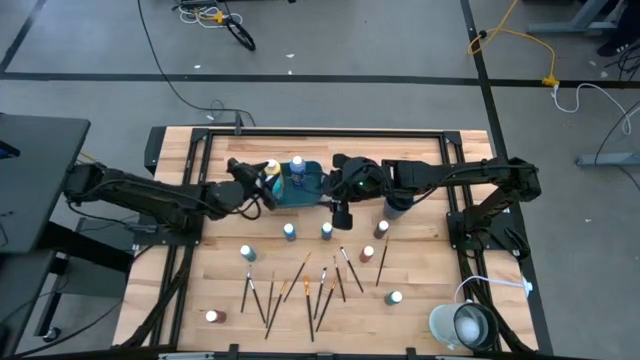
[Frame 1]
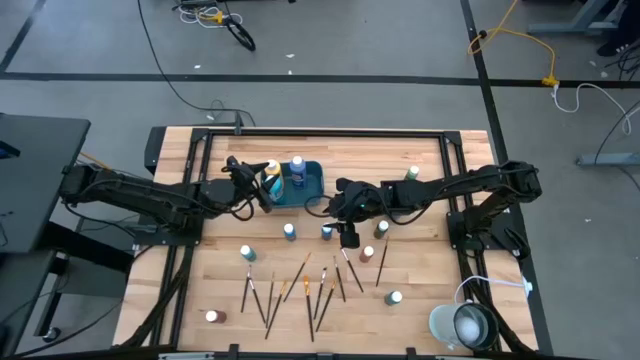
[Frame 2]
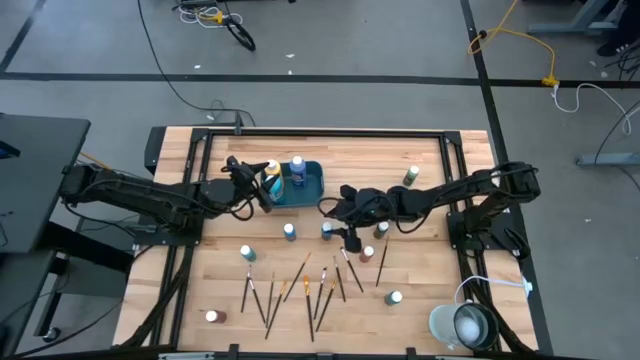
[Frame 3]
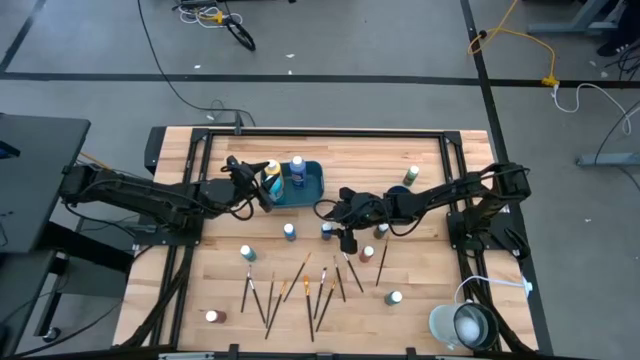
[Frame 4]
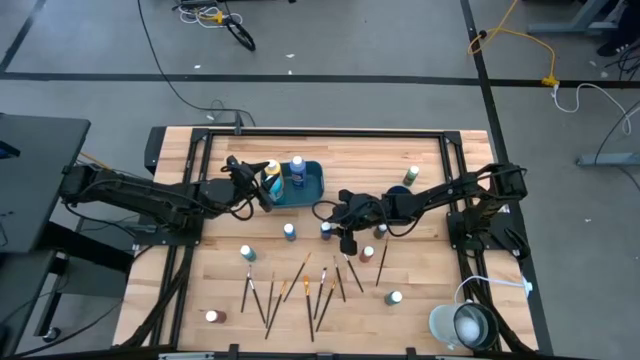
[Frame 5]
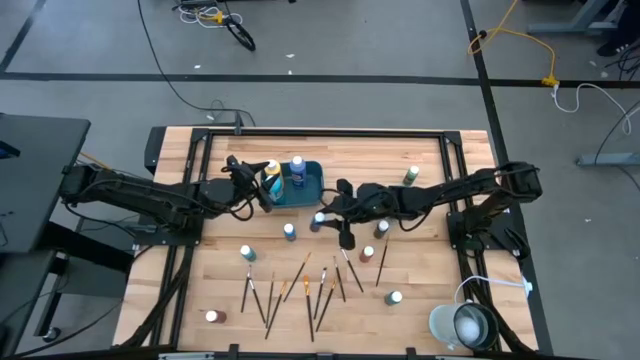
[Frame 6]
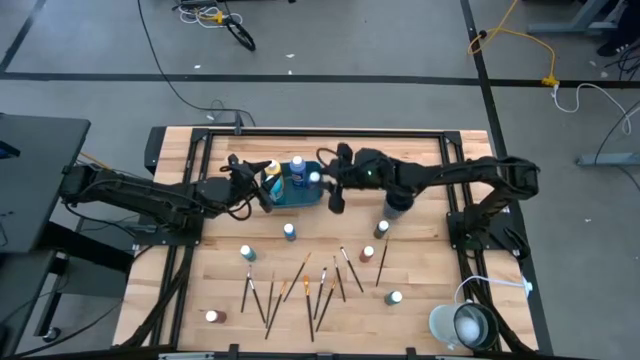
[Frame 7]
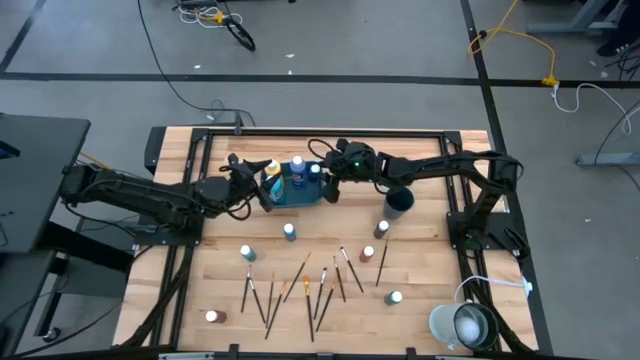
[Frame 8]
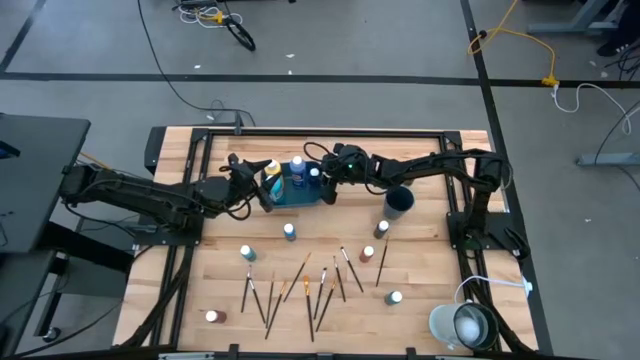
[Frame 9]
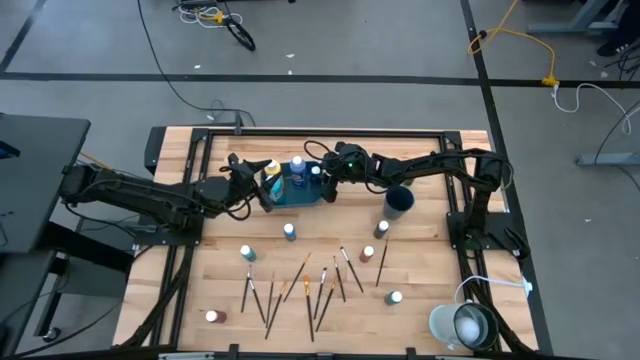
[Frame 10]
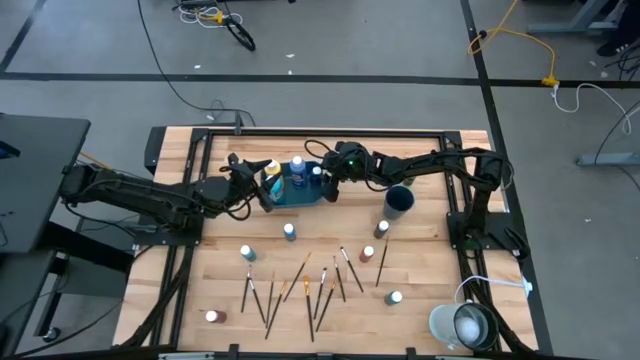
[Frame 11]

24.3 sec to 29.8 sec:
Task: Pick & Place Paint Supplies
Put the blue paint bottle into the blue bin

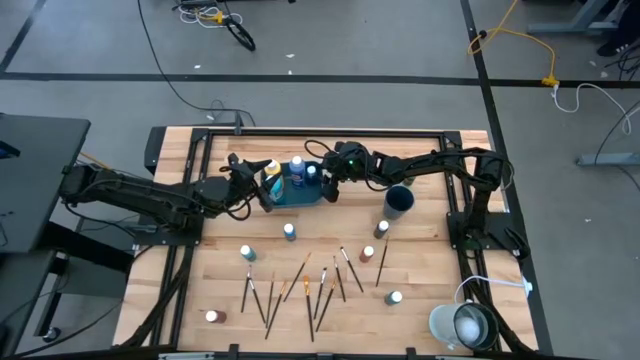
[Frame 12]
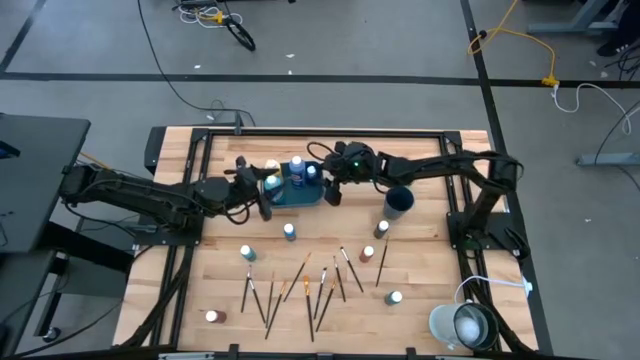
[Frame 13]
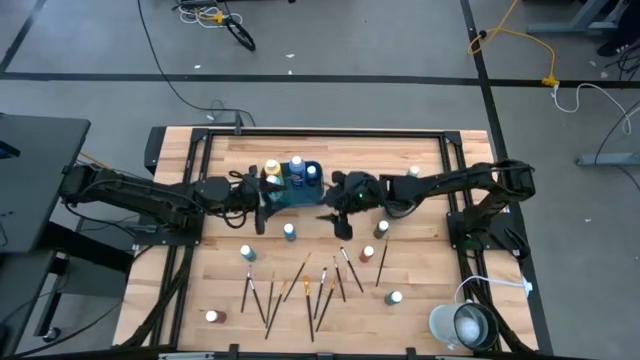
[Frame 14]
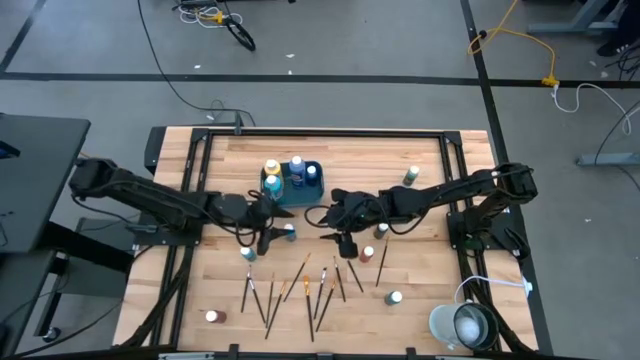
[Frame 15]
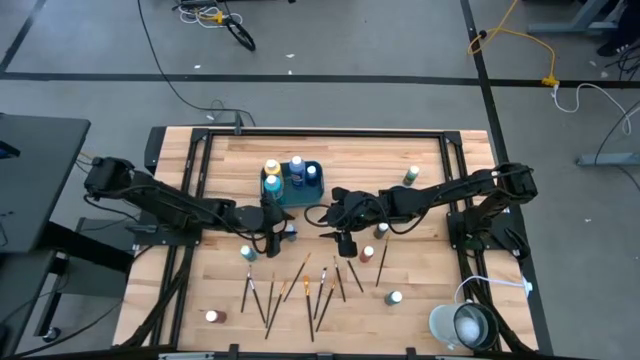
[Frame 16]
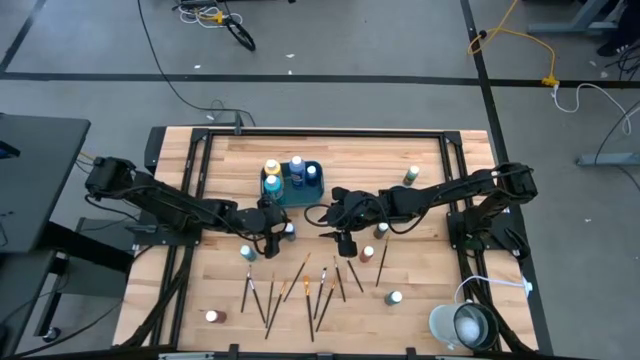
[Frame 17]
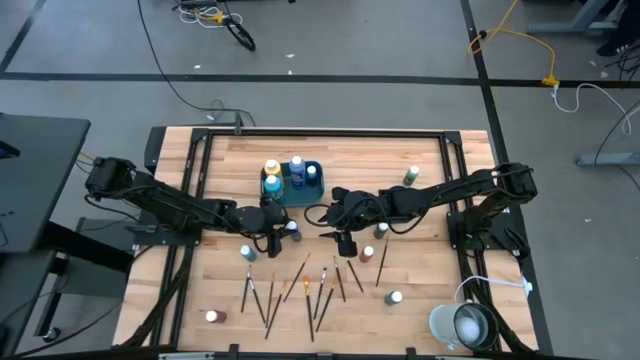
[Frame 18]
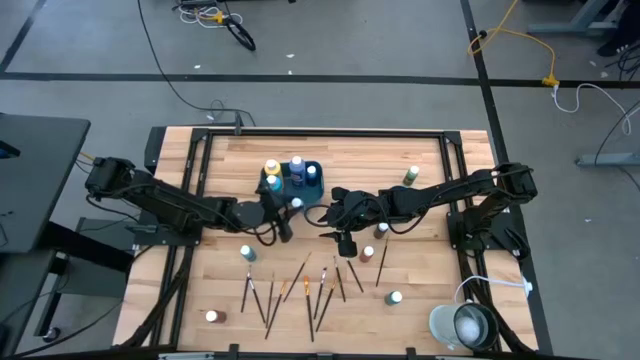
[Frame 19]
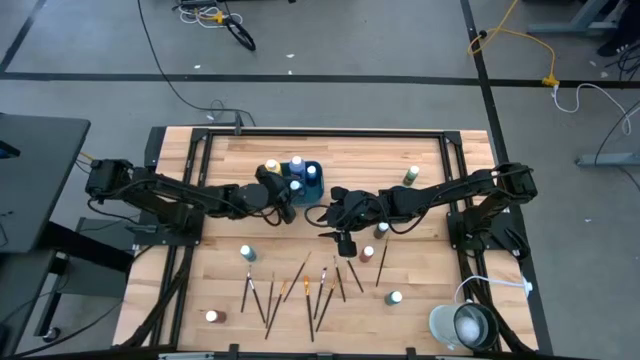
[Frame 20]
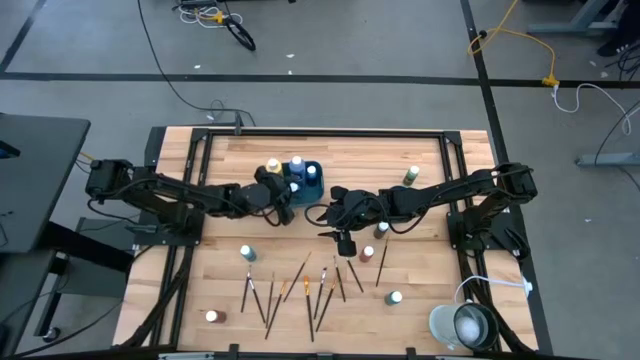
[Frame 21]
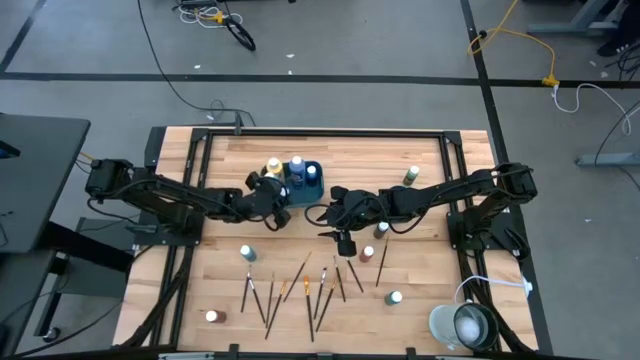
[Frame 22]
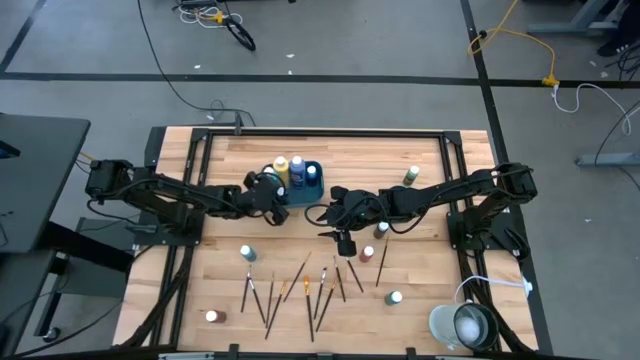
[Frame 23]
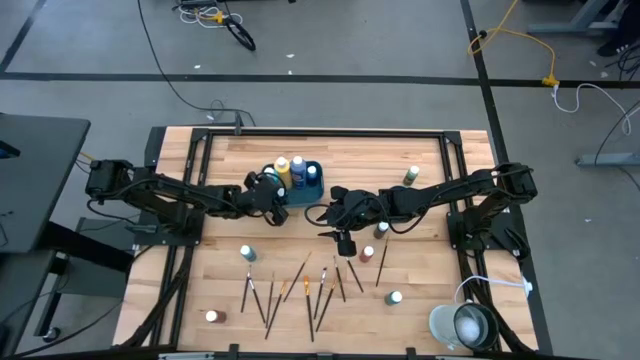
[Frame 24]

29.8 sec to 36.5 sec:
Put the blue paint bottle into the blue bin

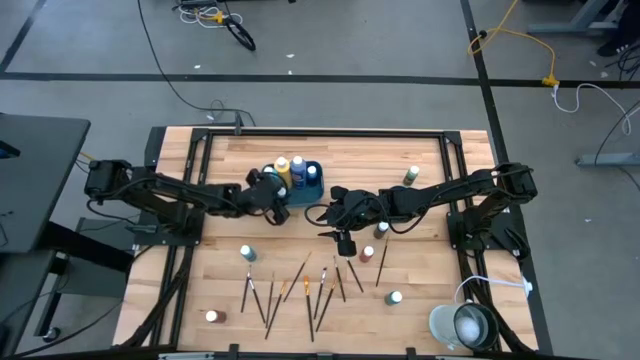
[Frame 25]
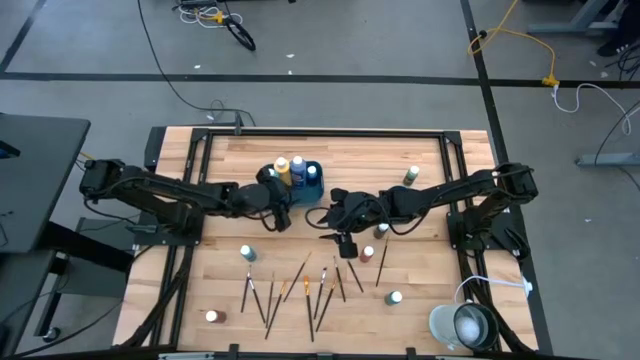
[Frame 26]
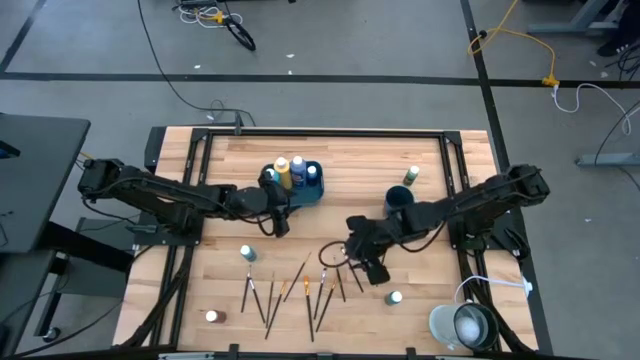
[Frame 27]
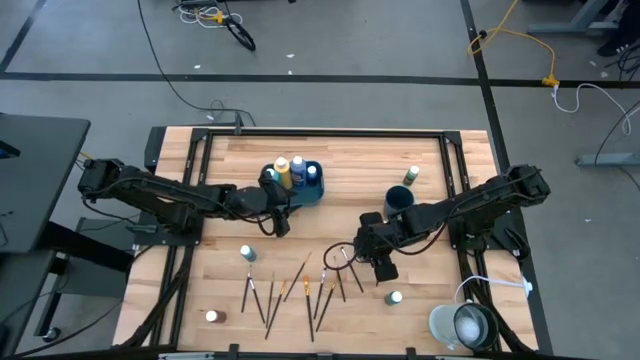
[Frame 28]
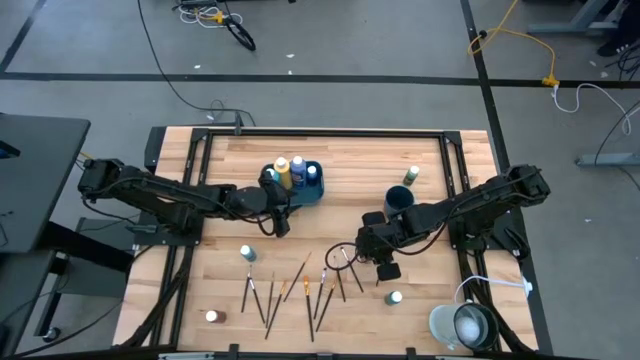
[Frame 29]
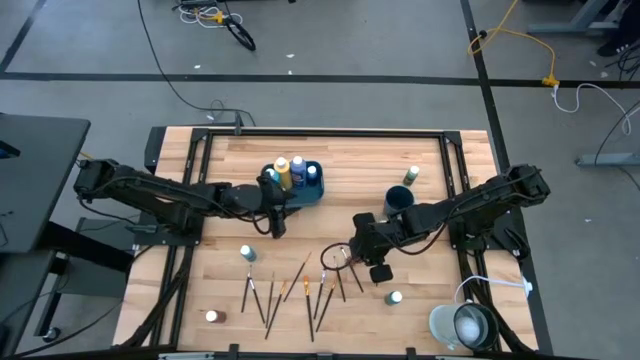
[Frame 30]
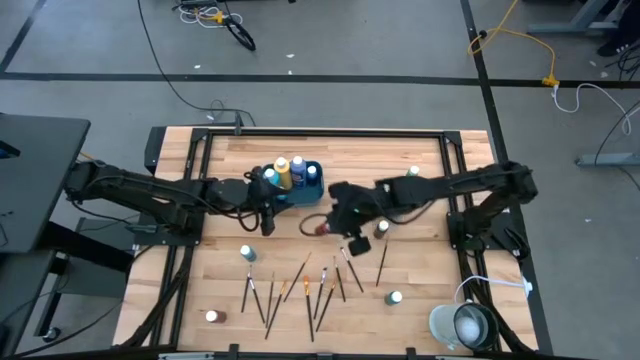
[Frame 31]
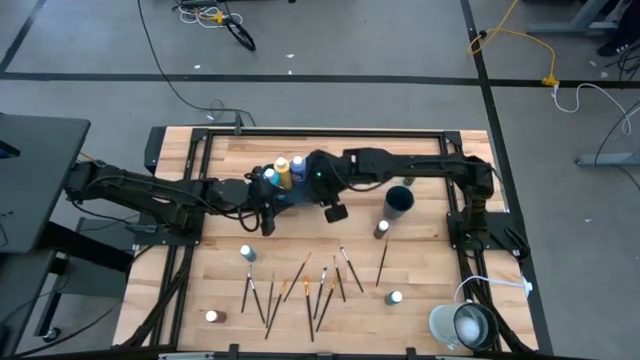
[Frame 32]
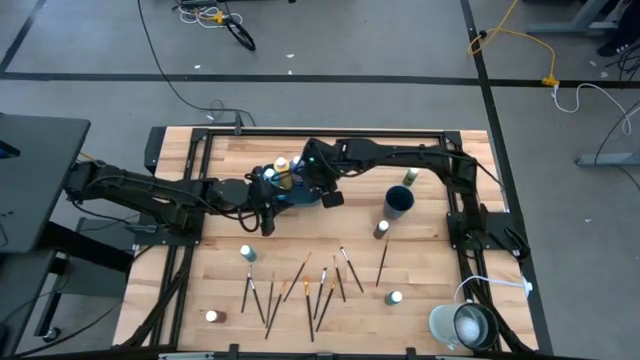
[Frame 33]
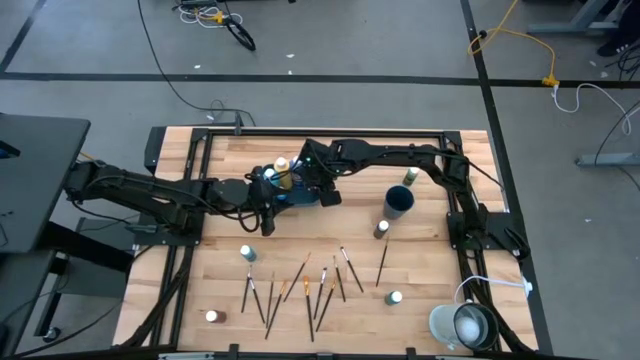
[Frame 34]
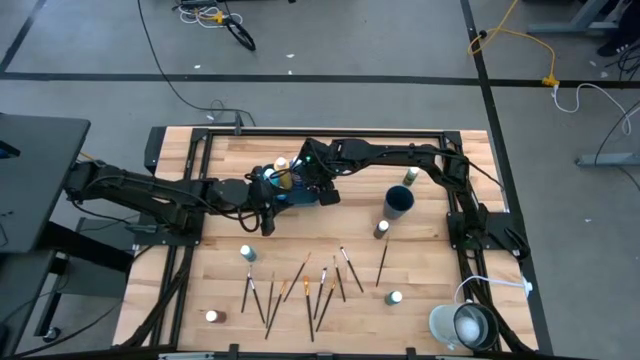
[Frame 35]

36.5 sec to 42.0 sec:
Put the red paint bottle into the blue bin

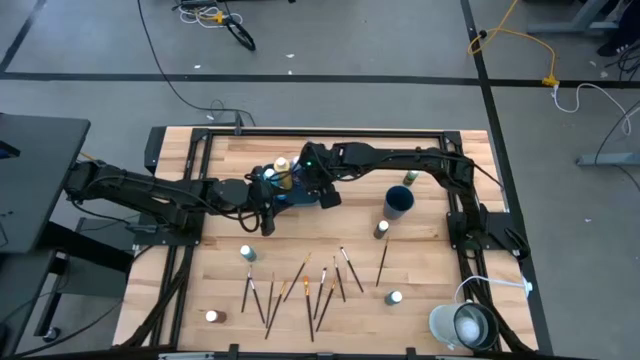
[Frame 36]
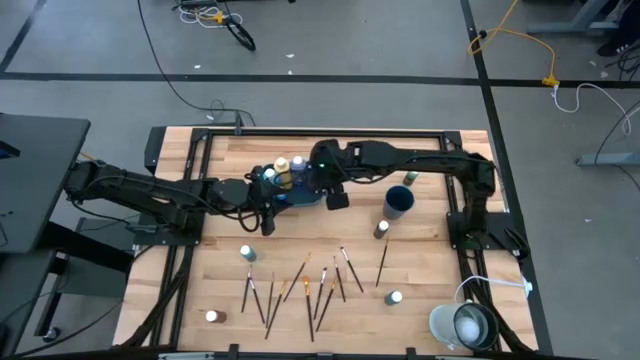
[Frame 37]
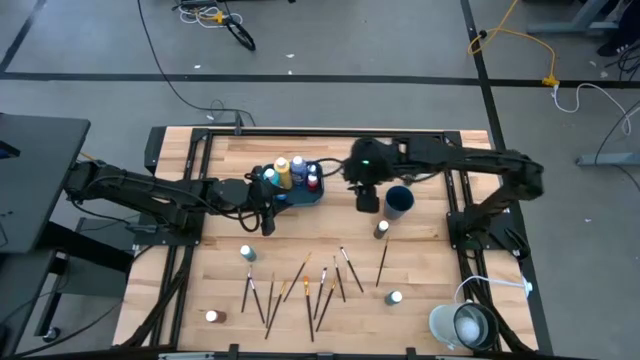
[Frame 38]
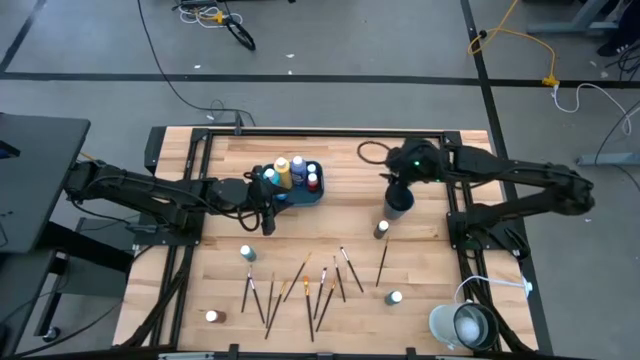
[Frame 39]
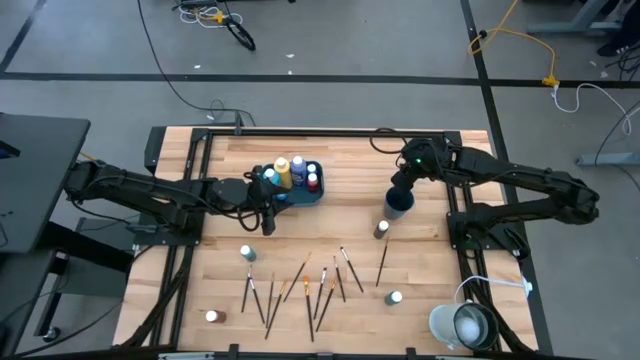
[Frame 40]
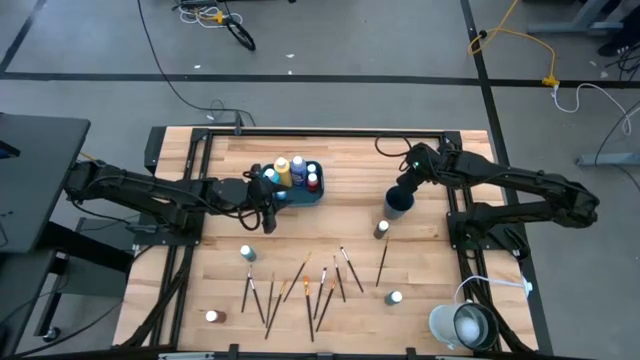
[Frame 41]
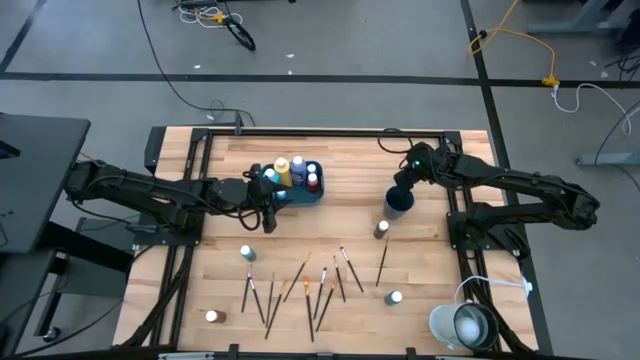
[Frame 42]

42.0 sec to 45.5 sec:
Put the green paint bottle into the blue bin
